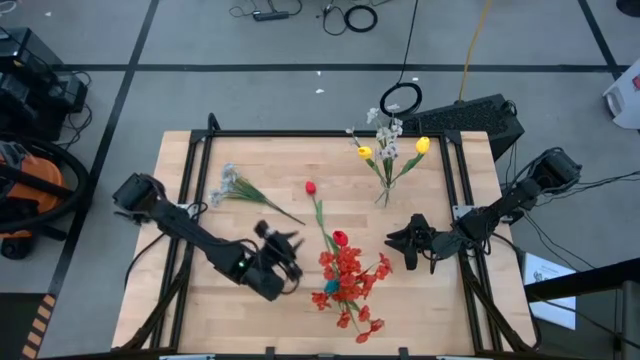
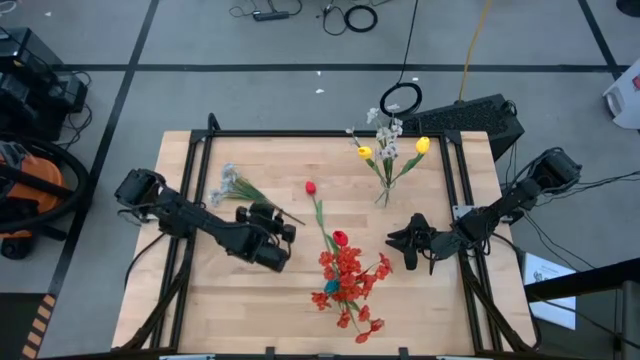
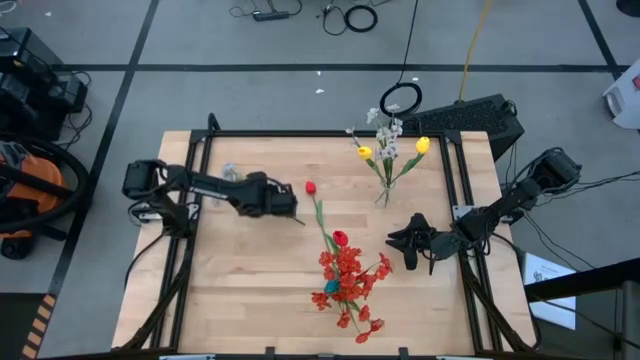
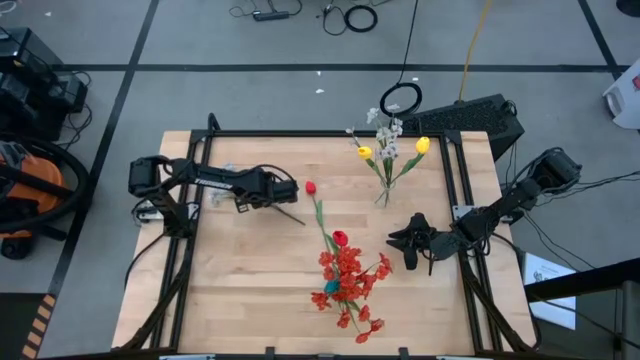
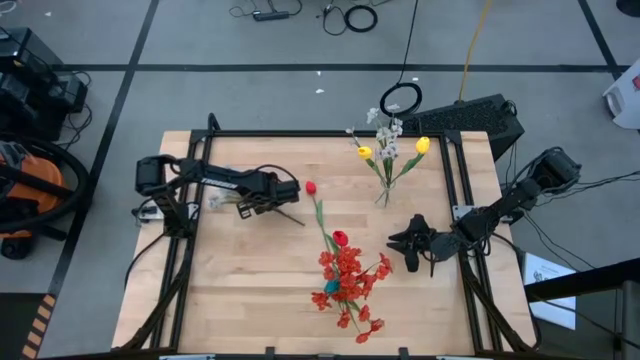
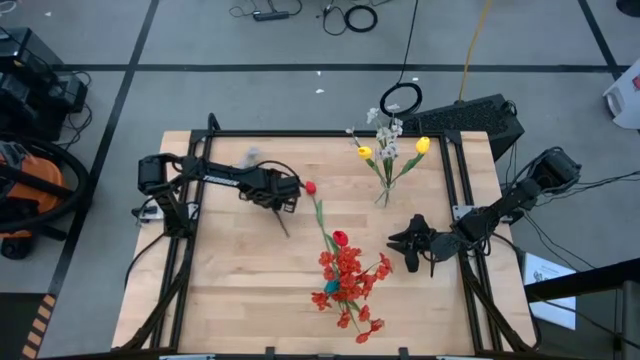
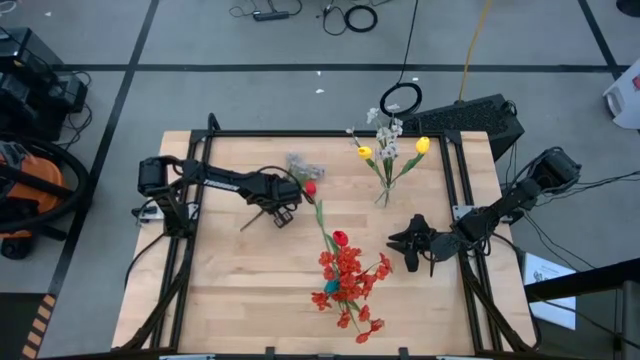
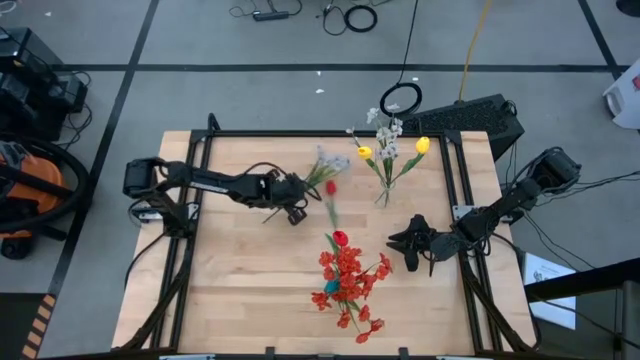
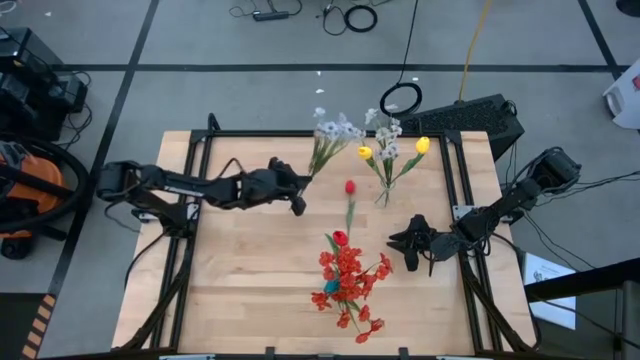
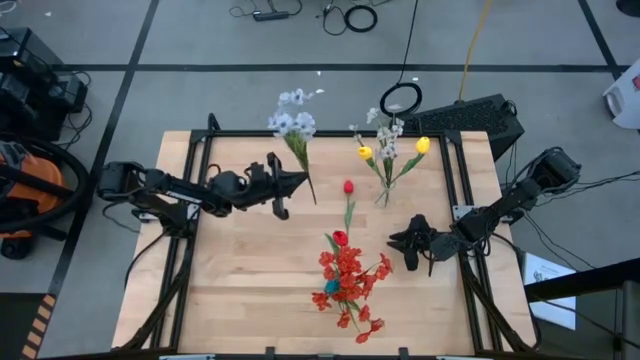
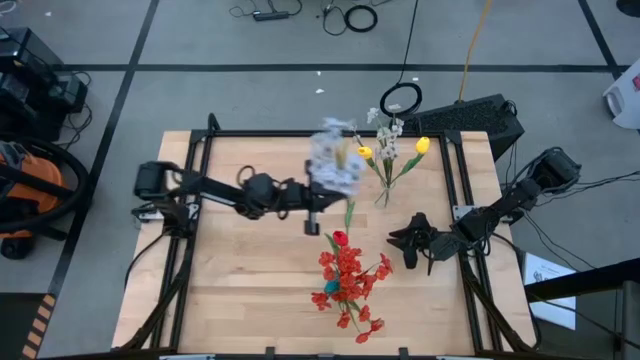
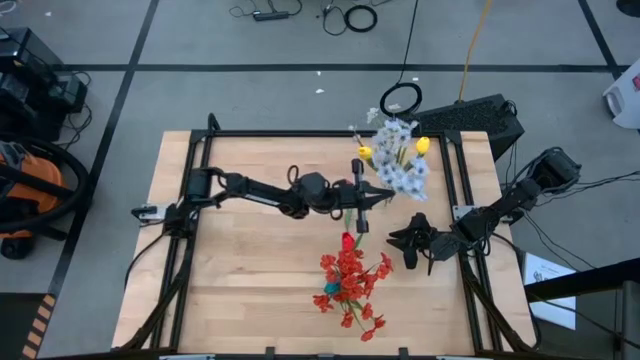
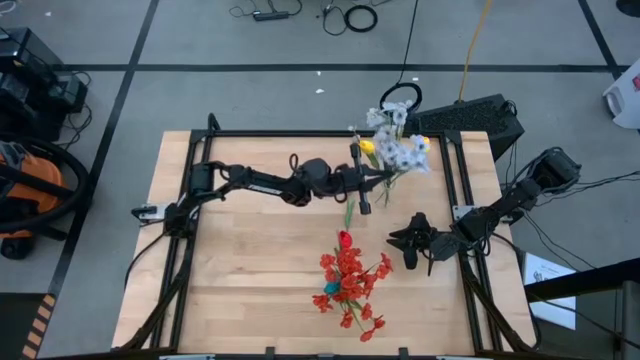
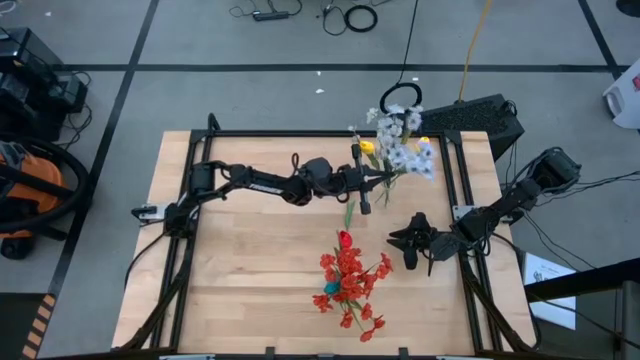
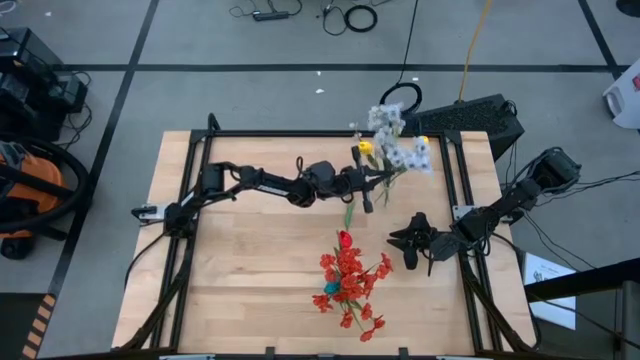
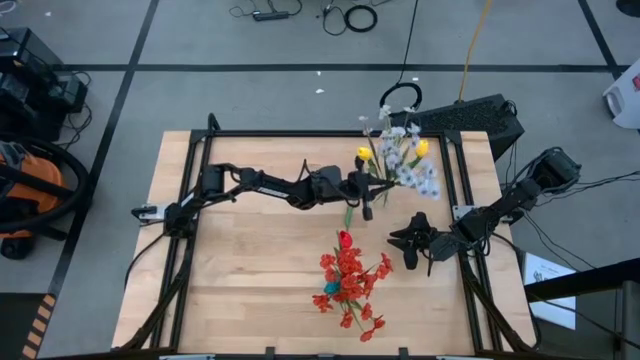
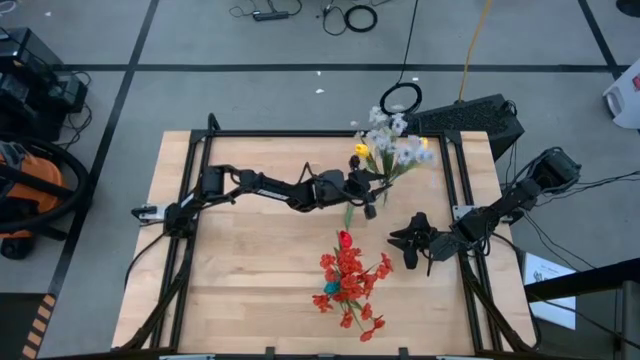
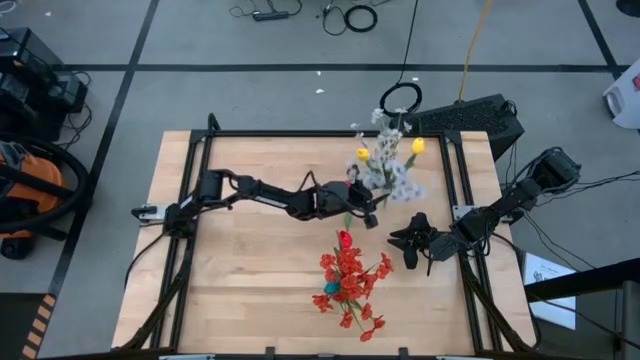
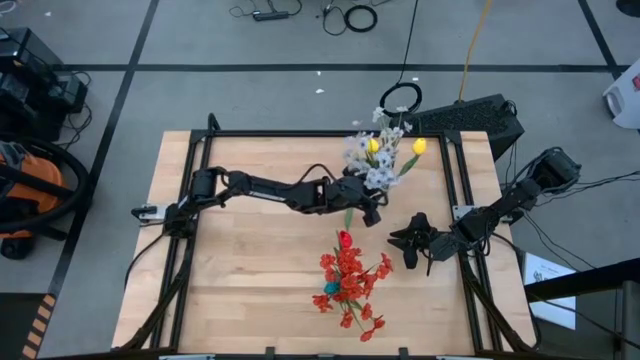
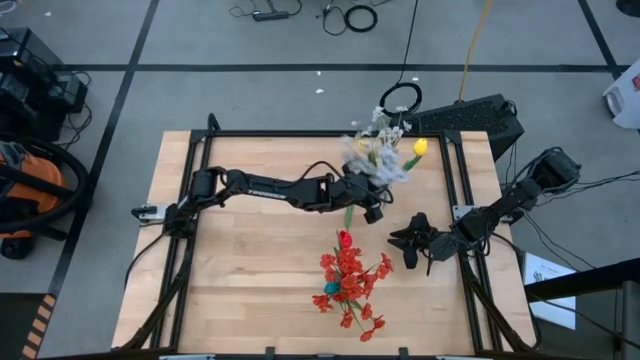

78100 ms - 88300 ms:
Task: Sort flowers into vase by color
Put the white flowers into the transparent vase

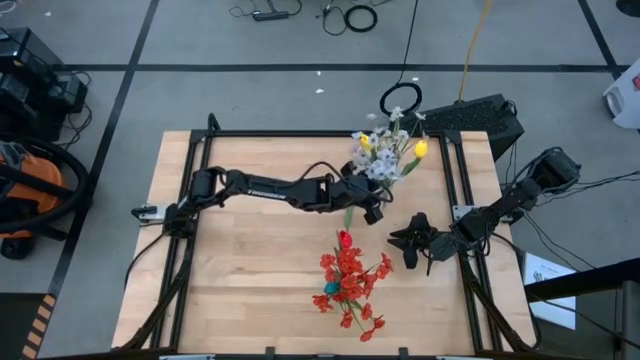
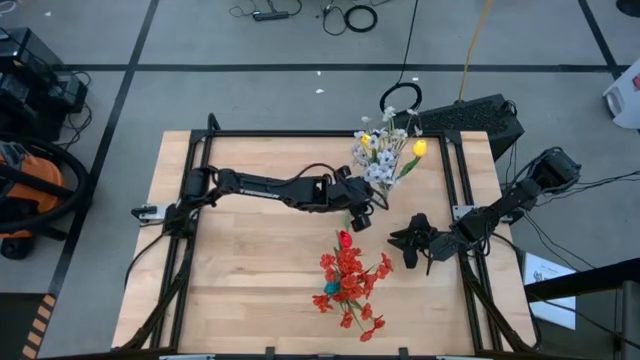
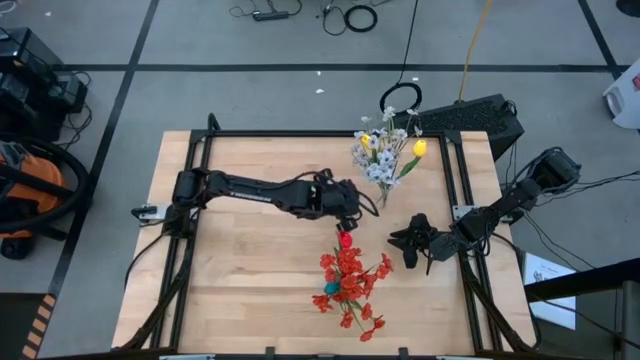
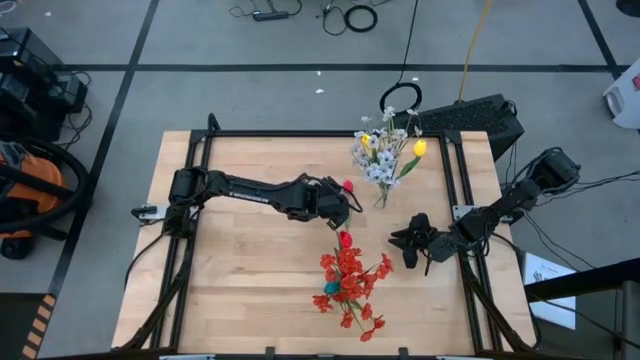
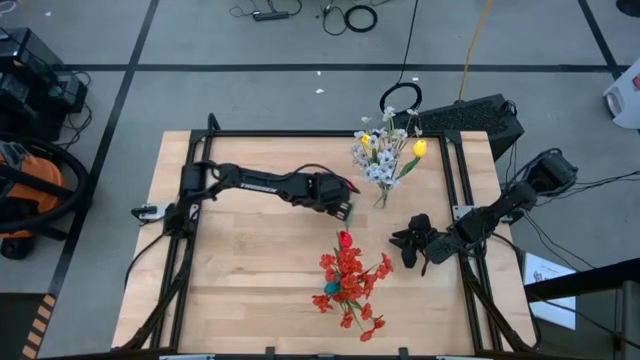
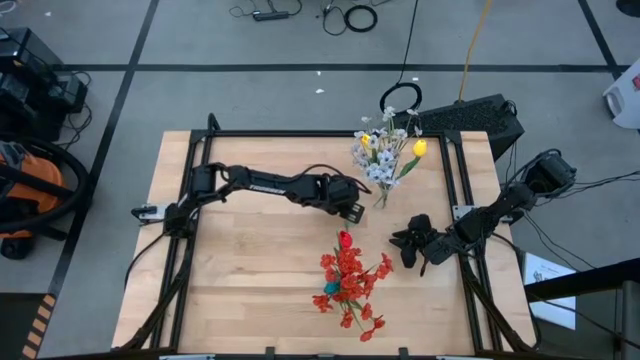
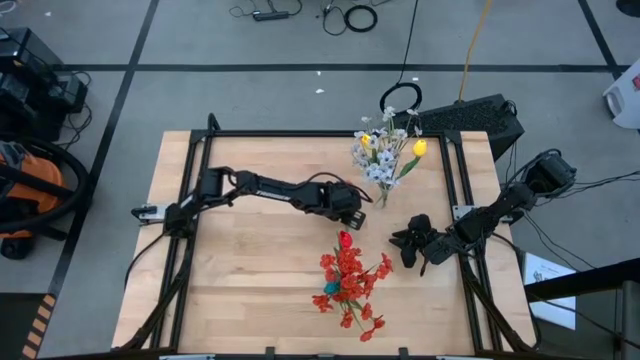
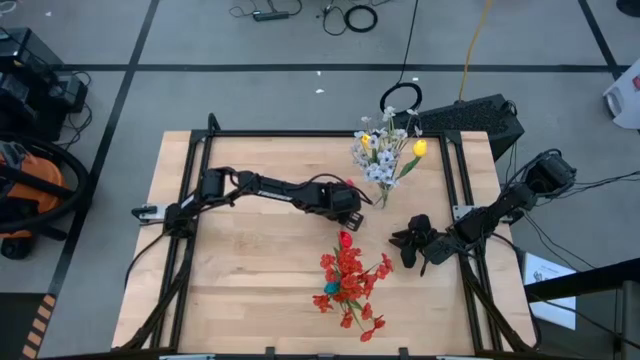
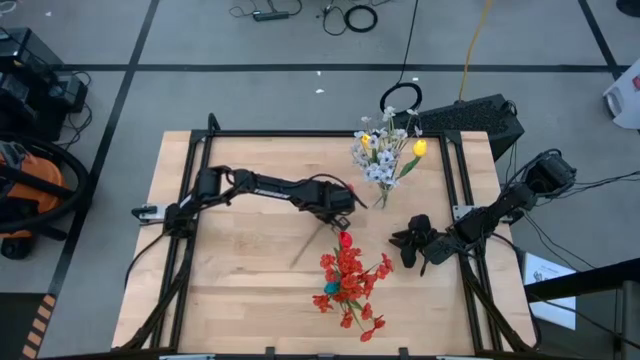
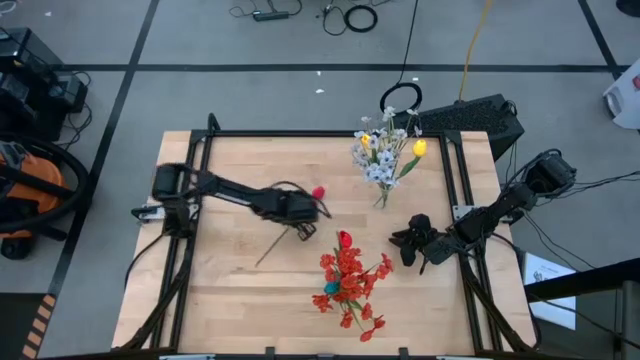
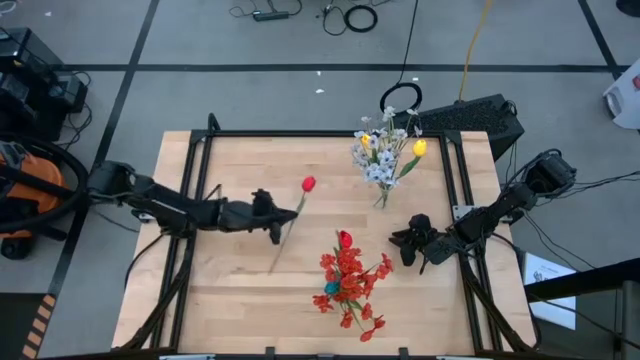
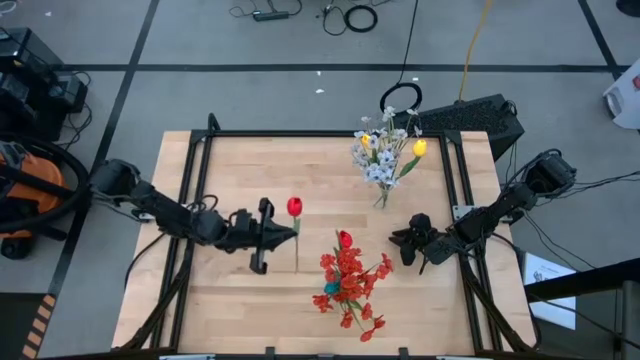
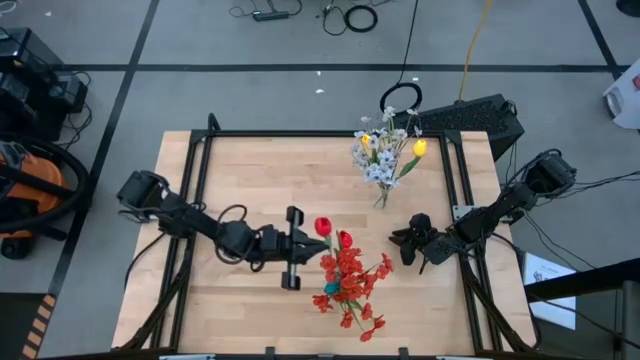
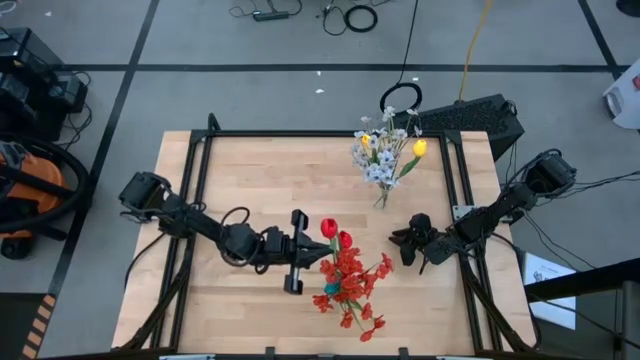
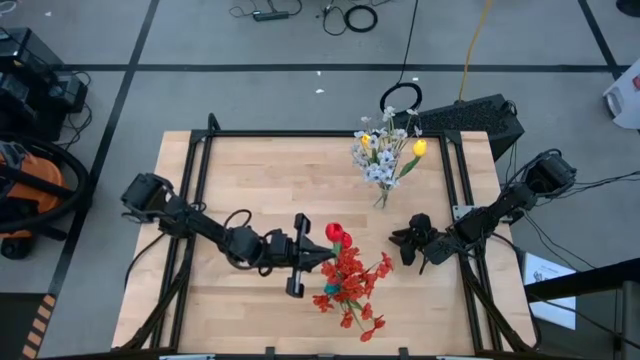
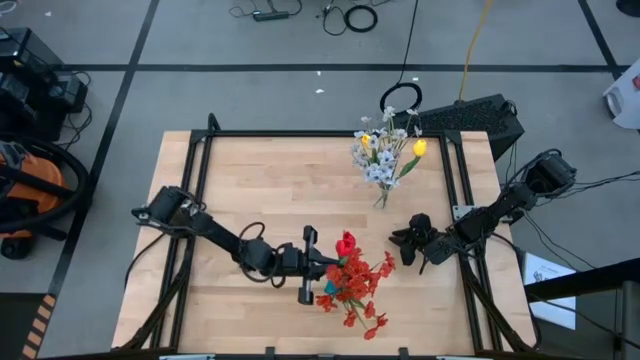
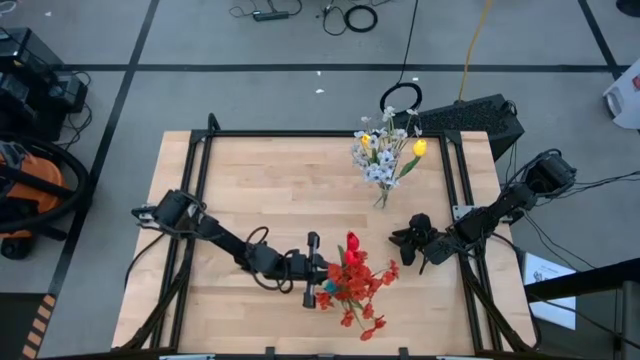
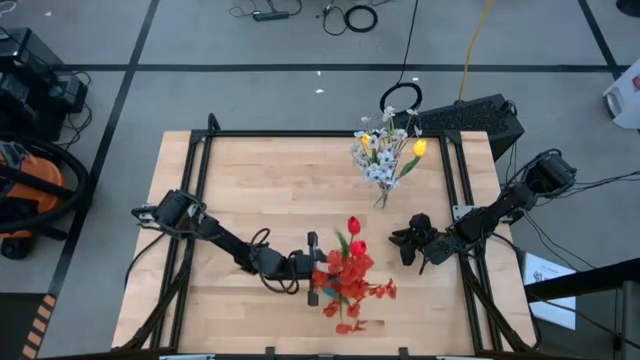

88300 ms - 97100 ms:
Put the red flower into the blue vase

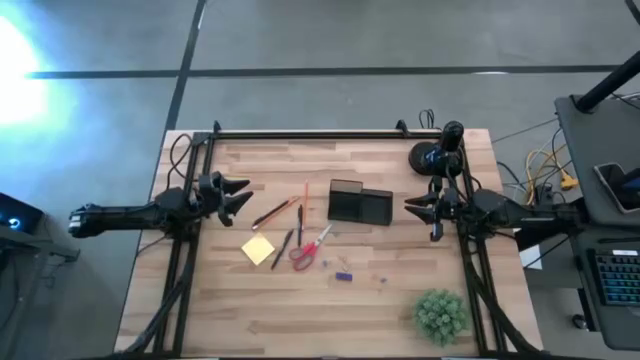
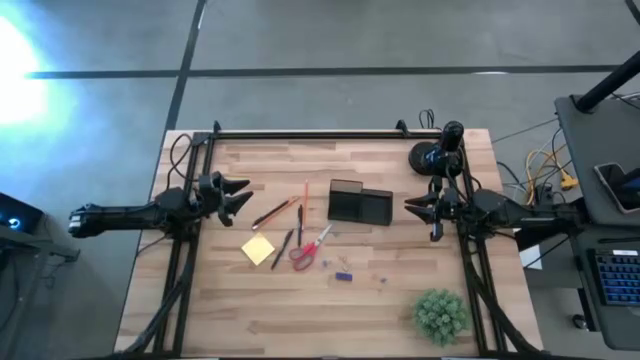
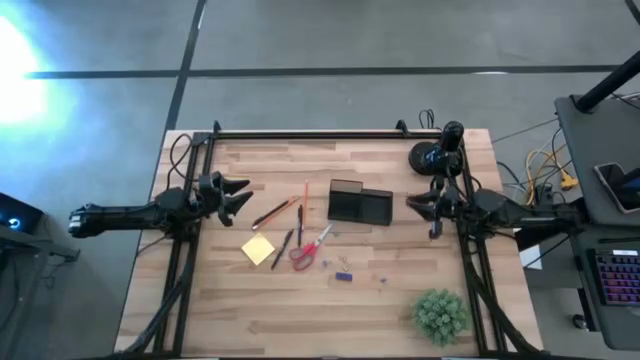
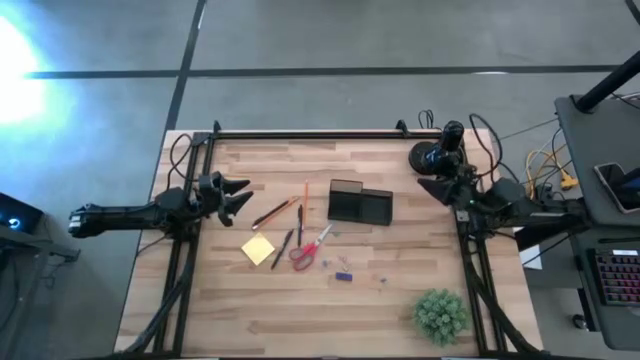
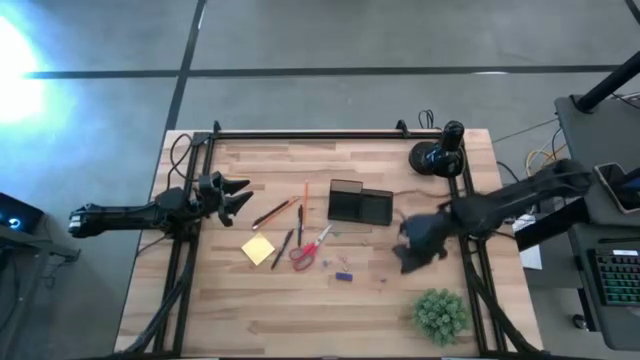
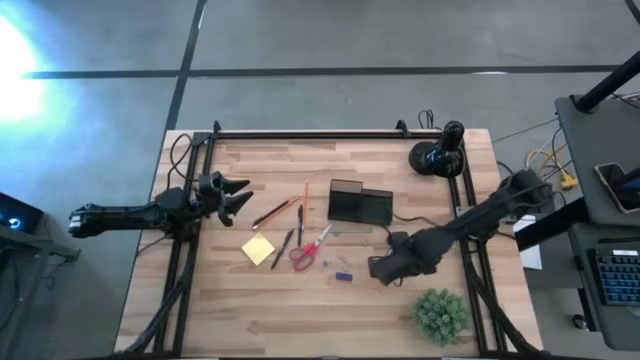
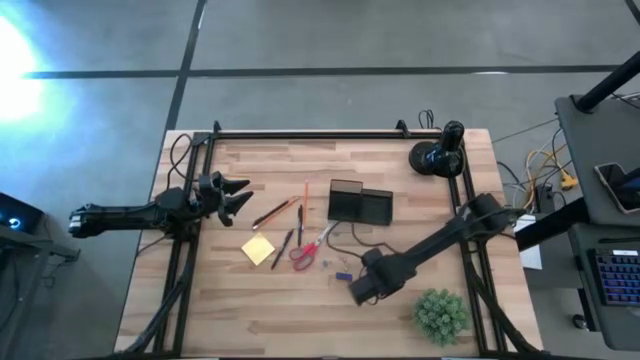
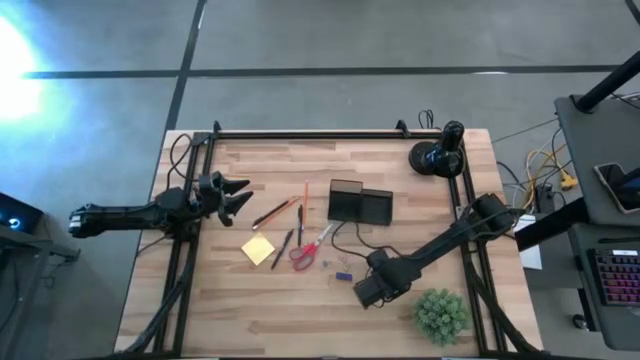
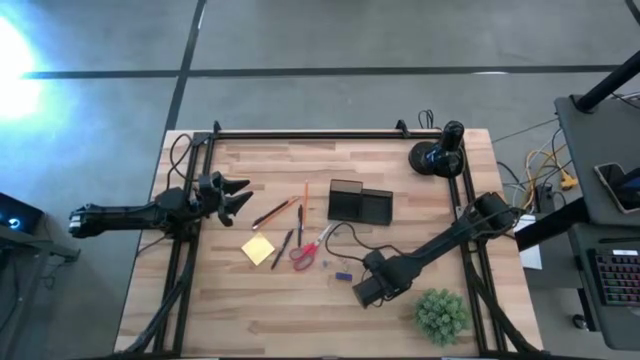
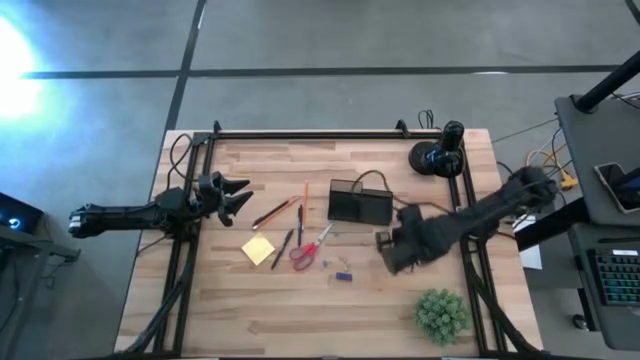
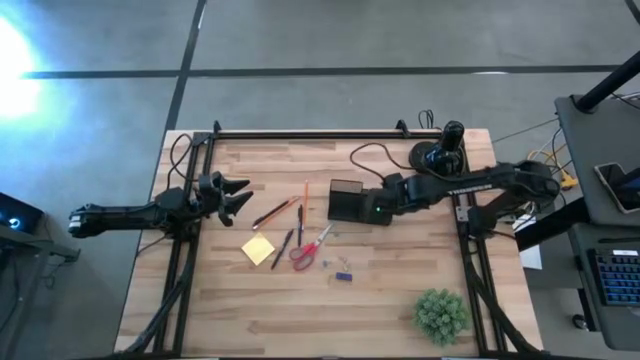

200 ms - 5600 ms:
Task: Pick and place office supplies into organizer
Put the bottom blue binder clip into the desk organizer
